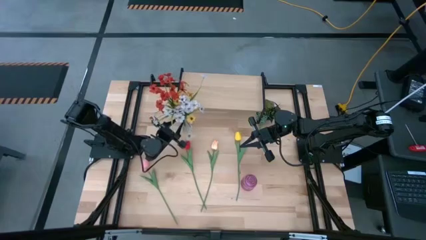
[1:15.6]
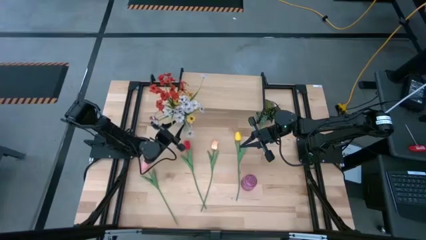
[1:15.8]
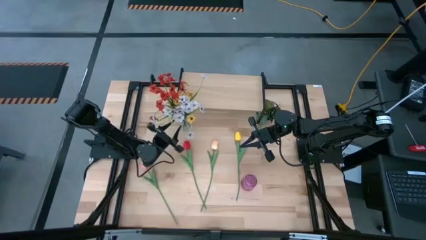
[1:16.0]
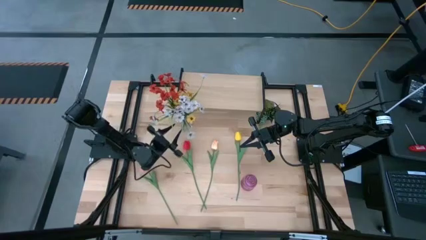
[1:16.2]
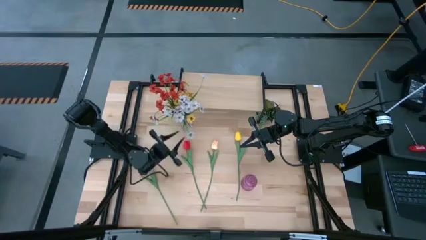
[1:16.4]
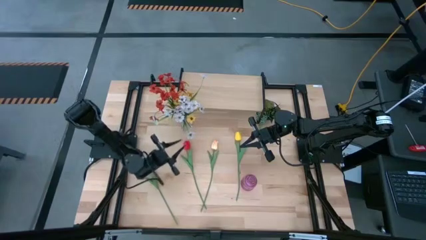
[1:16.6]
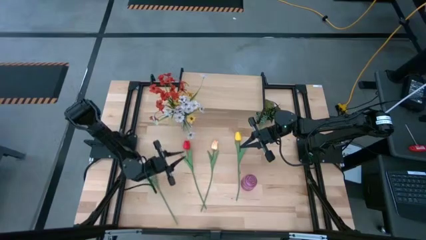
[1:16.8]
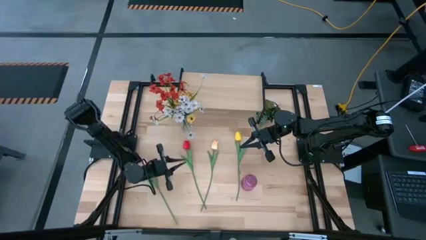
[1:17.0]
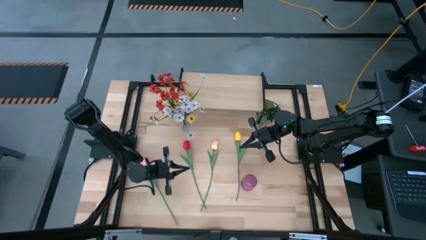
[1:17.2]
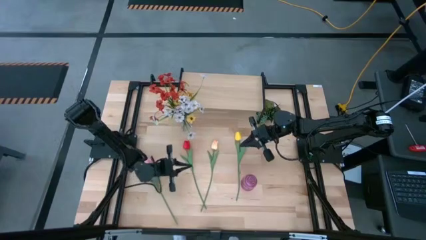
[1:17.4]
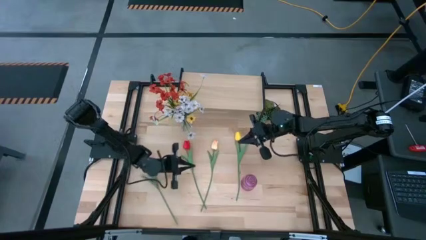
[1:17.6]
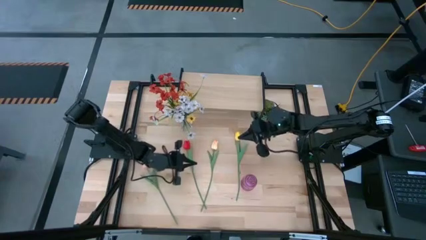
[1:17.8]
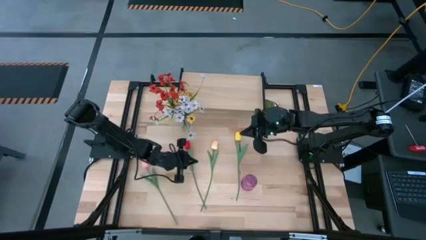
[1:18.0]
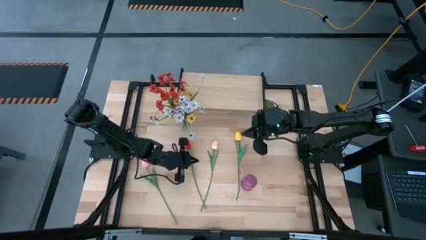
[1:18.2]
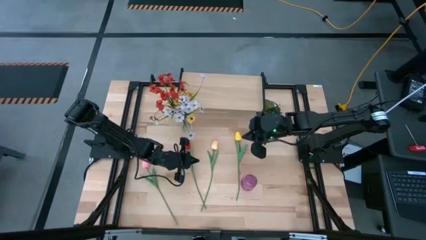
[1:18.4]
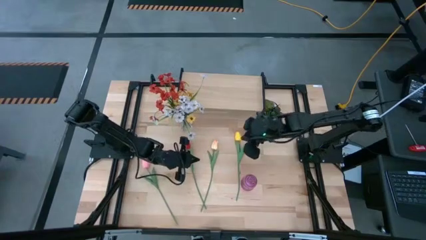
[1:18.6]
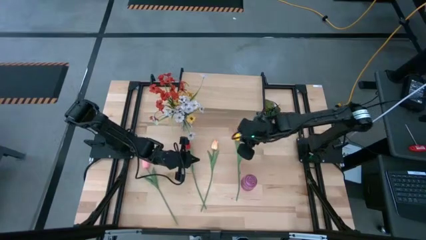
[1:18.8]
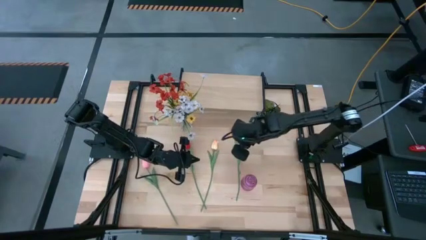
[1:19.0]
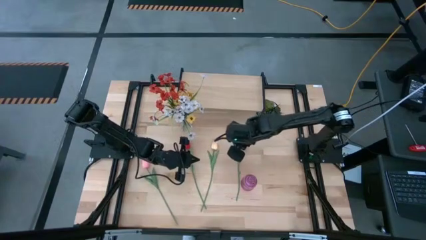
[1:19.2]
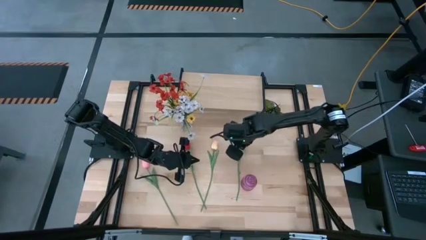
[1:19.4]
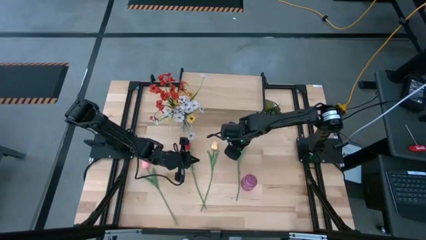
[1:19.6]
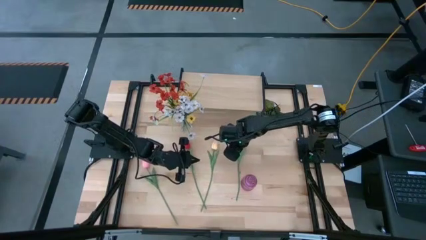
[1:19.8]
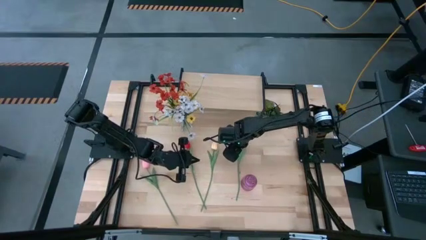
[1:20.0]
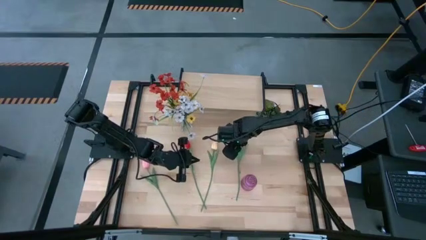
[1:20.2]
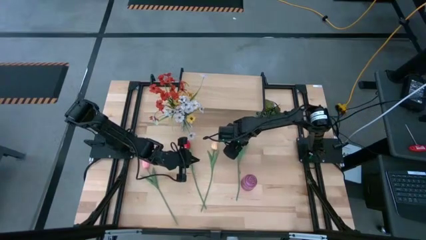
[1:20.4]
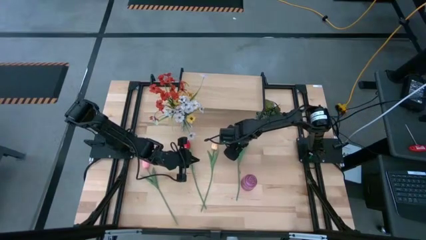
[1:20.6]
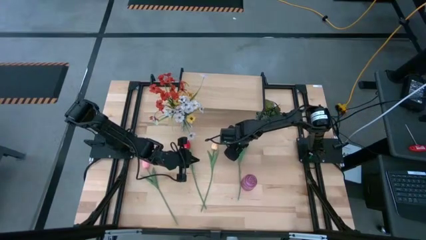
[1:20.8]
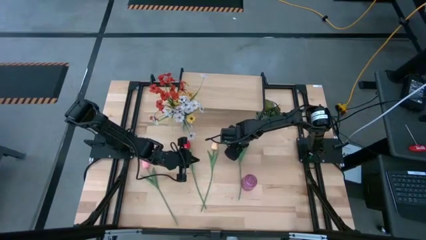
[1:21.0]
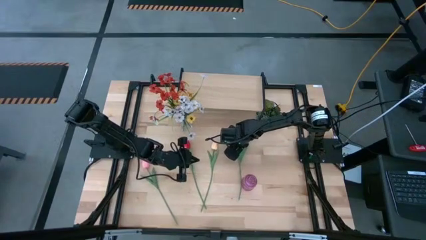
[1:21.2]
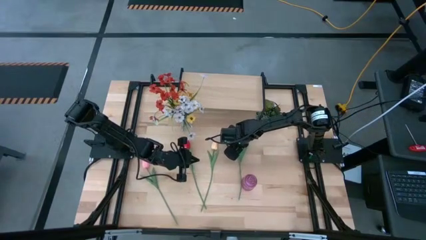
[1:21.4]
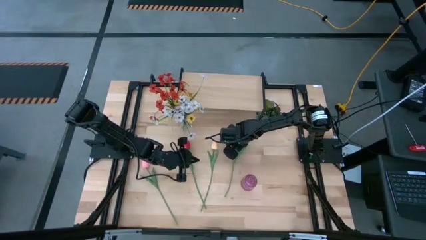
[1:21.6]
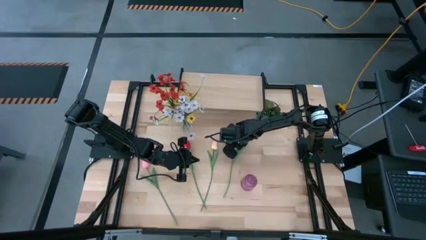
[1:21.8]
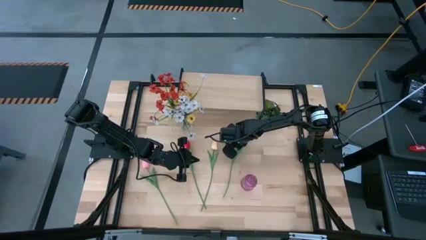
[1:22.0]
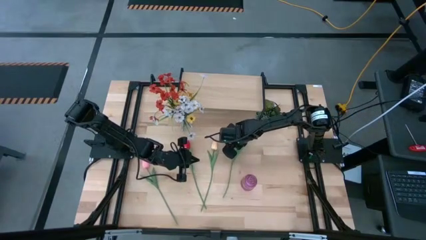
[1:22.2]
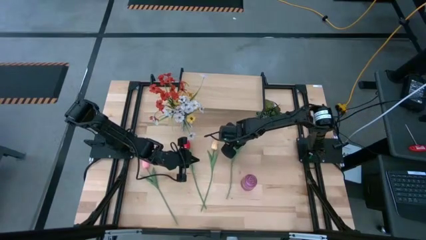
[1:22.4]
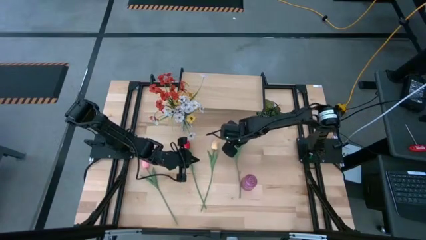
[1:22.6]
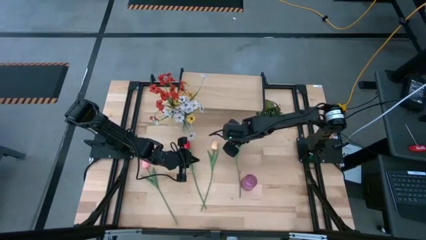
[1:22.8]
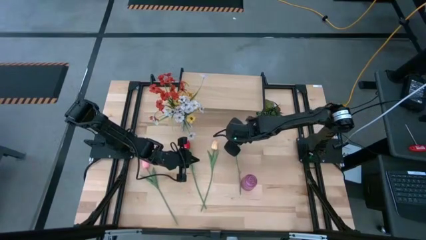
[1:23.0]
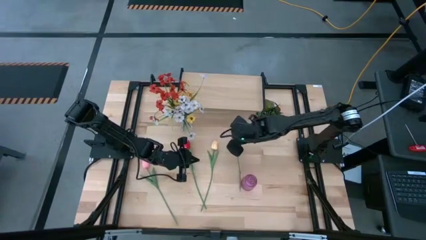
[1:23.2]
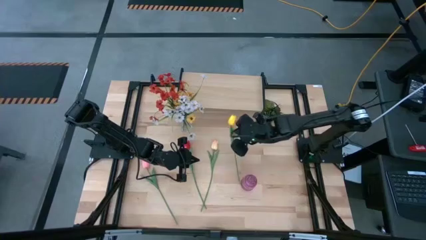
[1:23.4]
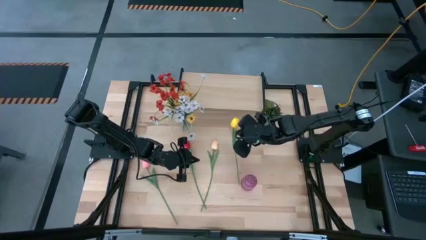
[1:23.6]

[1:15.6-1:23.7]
Task: Pick and place flowers into a vace then onto a shelf
Put the yellow flower into the purple vase

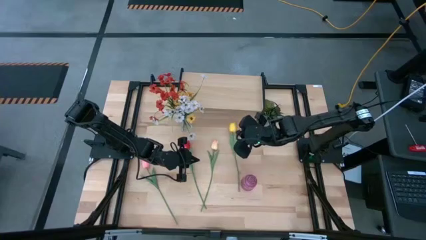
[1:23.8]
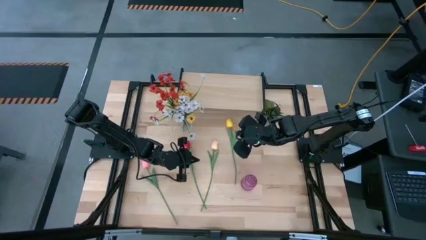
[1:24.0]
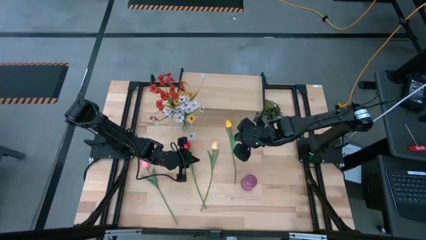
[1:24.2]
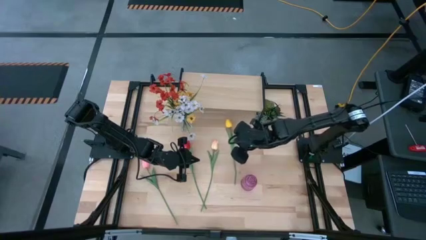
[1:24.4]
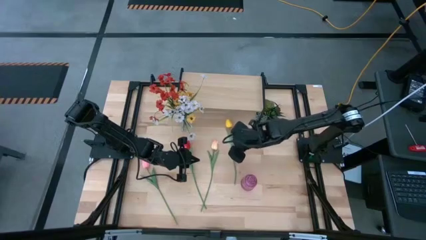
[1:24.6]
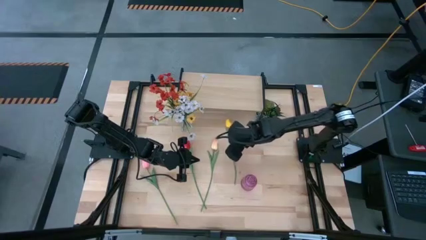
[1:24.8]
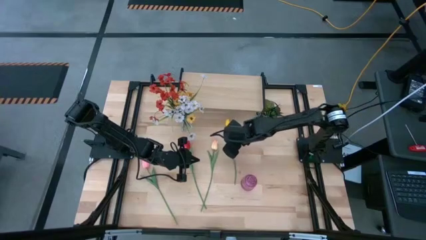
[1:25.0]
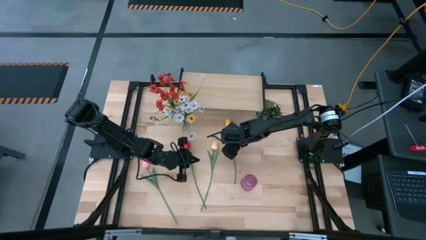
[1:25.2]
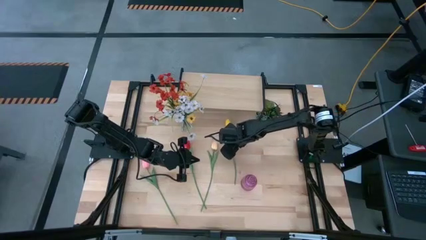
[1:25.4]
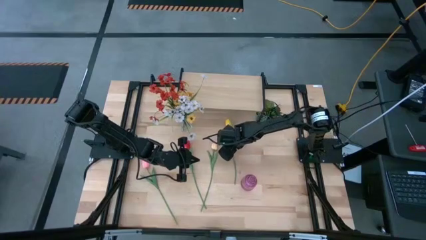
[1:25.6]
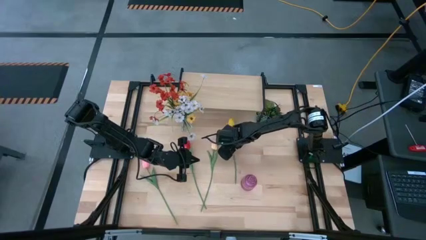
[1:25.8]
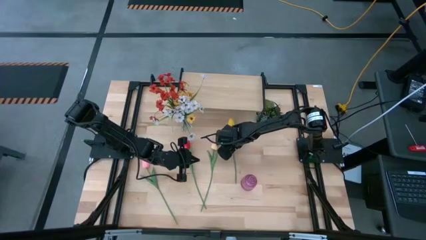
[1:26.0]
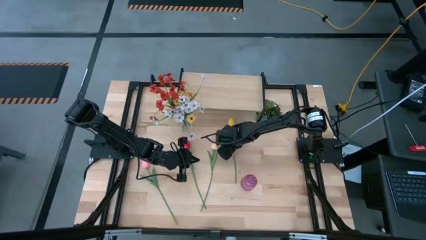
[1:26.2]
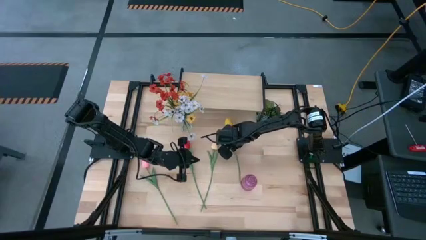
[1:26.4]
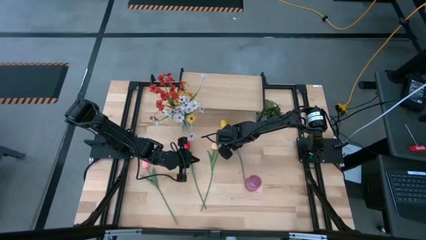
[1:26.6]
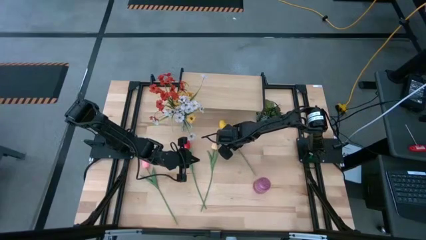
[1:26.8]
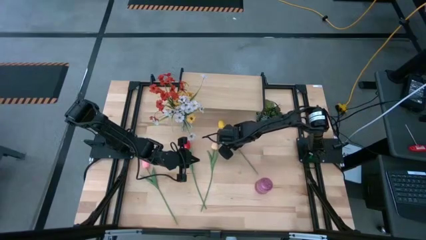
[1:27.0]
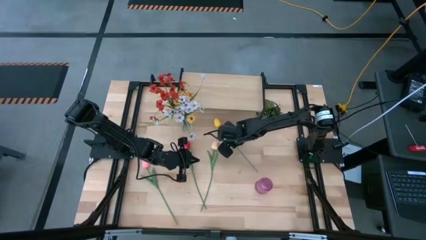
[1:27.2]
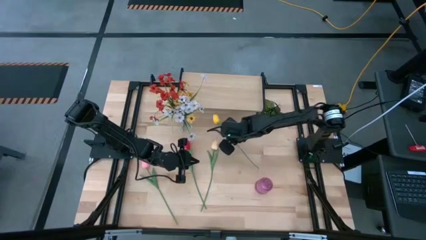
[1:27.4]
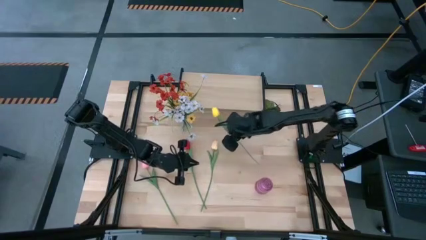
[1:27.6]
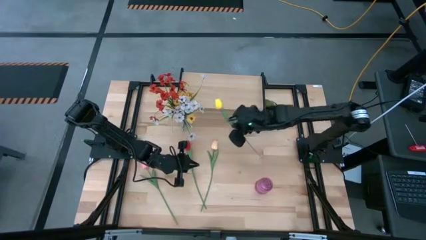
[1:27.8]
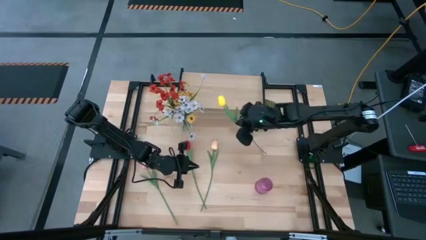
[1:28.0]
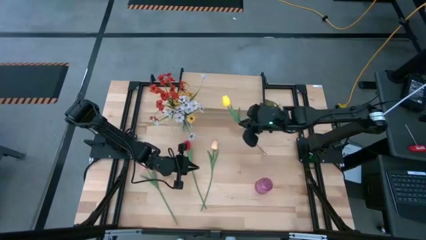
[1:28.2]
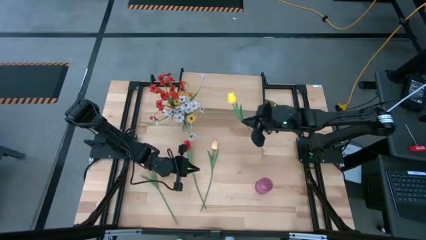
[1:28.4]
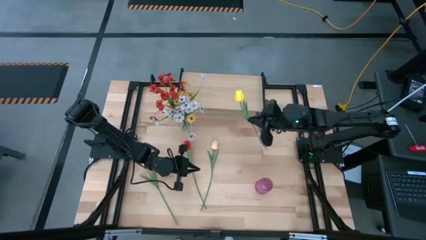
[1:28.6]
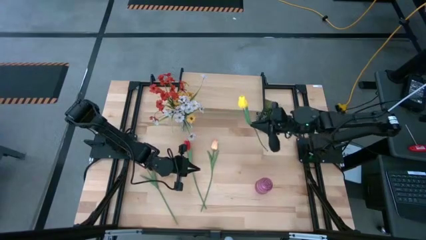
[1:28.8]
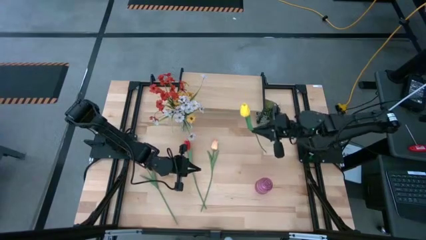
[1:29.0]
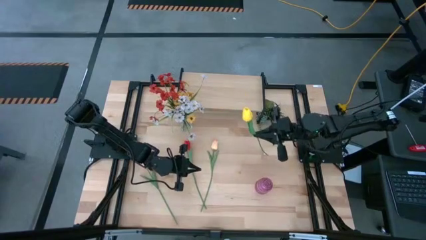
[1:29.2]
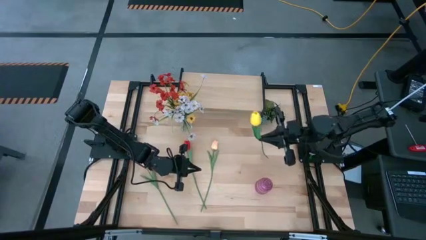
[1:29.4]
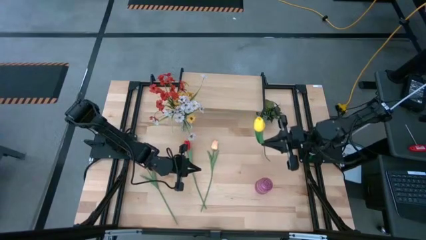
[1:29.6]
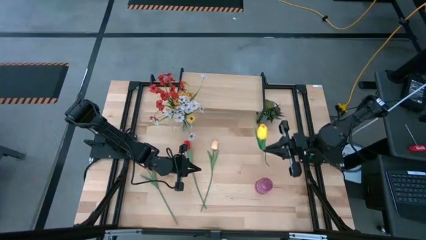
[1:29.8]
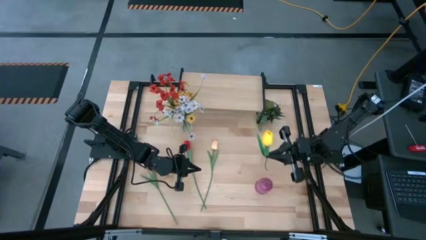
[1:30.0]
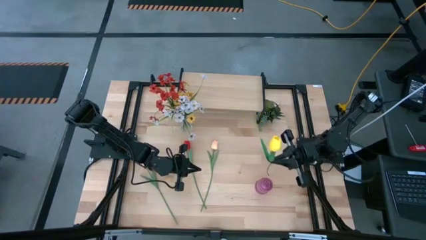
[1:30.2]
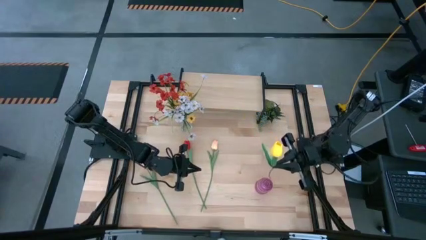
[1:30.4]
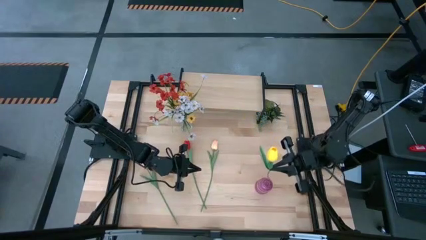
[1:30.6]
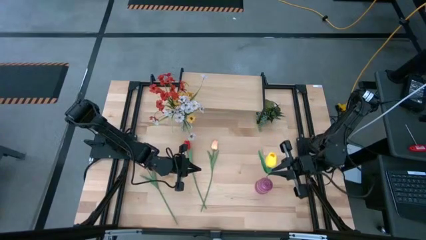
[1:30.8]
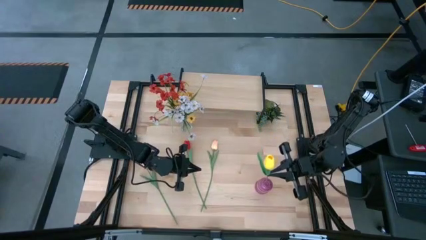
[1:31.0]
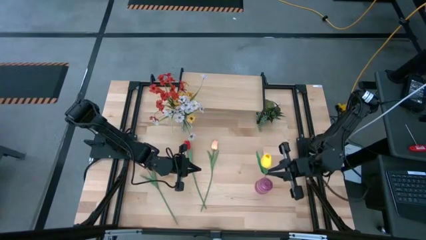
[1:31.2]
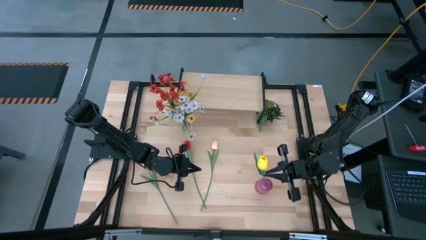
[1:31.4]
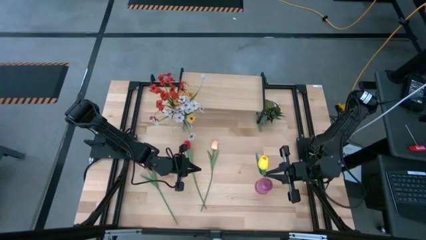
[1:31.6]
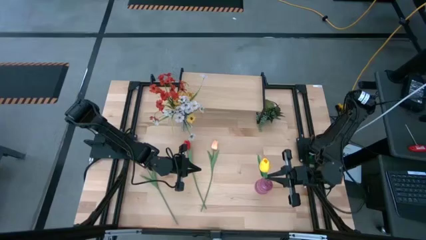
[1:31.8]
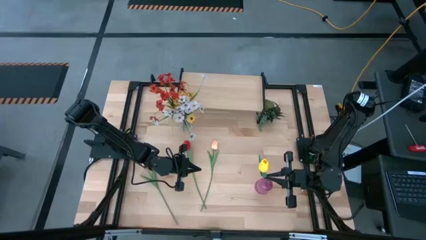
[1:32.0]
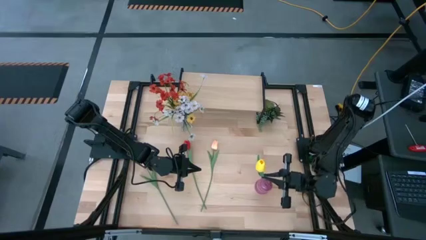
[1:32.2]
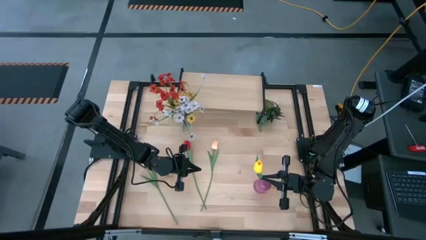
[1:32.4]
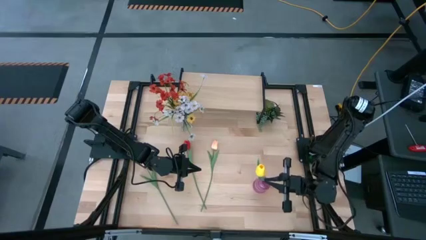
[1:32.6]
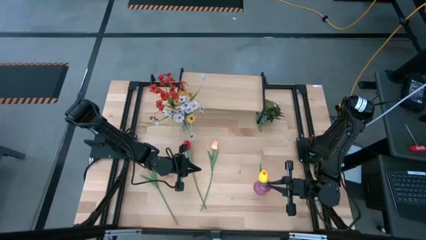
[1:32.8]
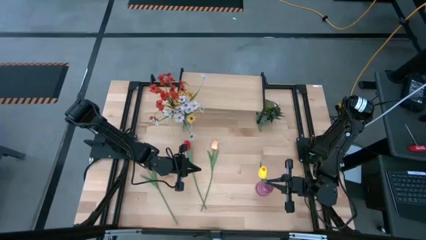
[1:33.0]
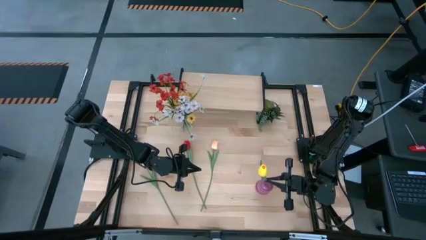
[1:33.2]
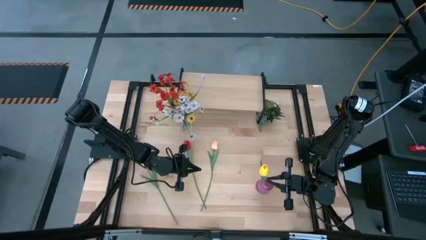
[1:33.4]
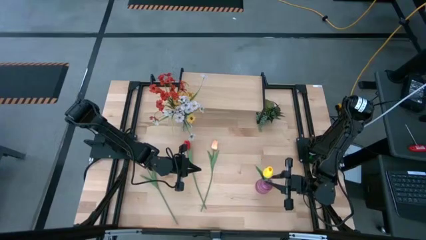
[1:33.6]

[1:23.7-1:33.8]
Put the yellow flower into the purple vase
